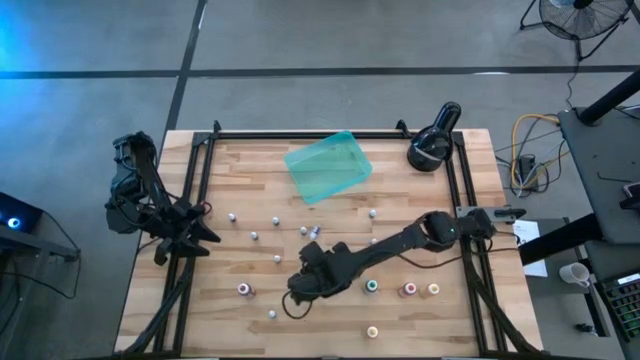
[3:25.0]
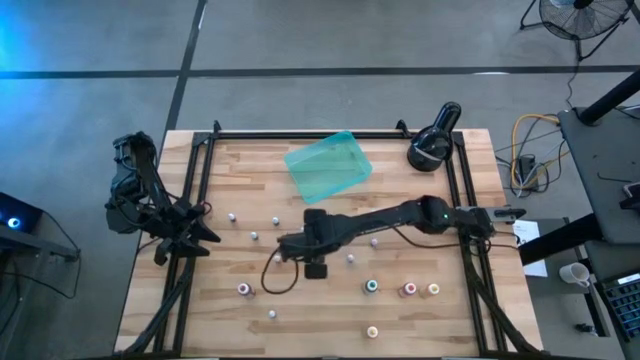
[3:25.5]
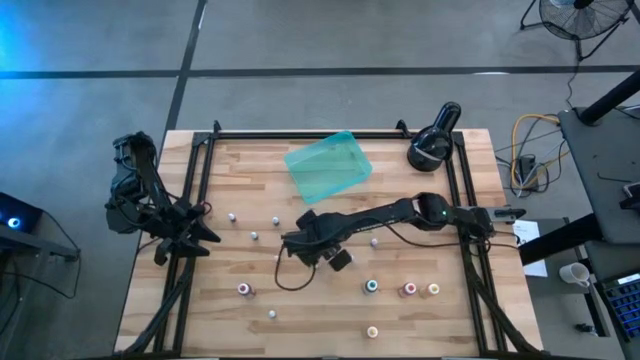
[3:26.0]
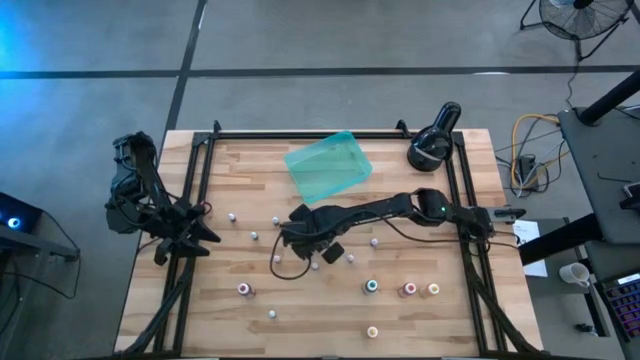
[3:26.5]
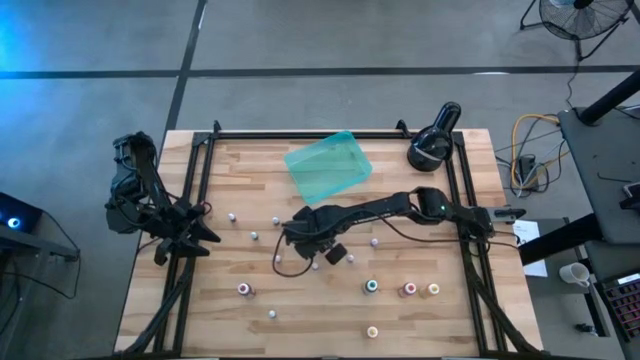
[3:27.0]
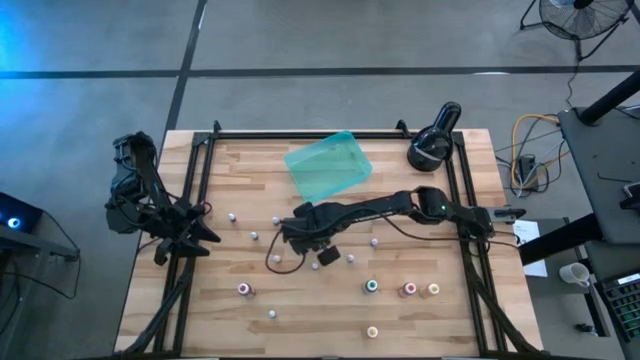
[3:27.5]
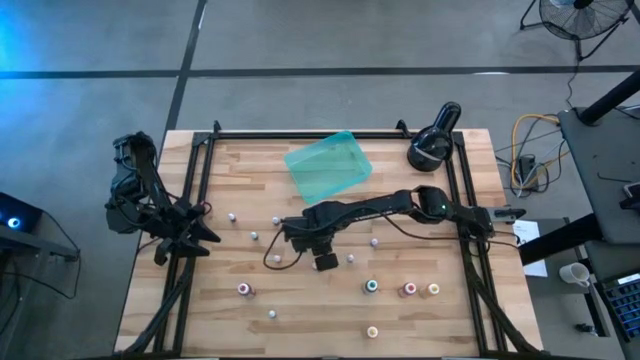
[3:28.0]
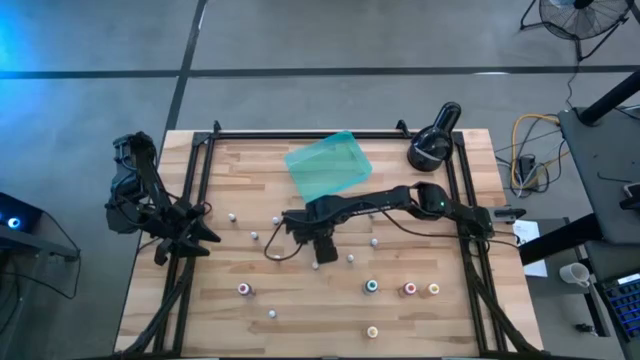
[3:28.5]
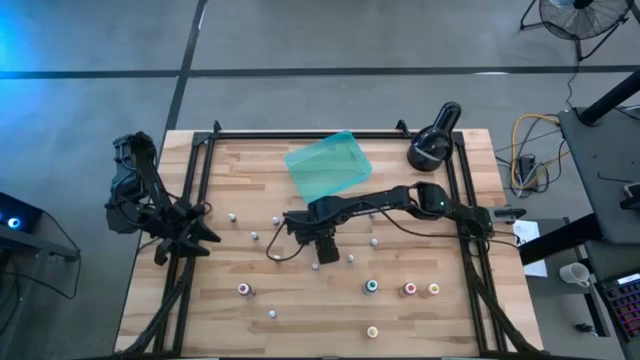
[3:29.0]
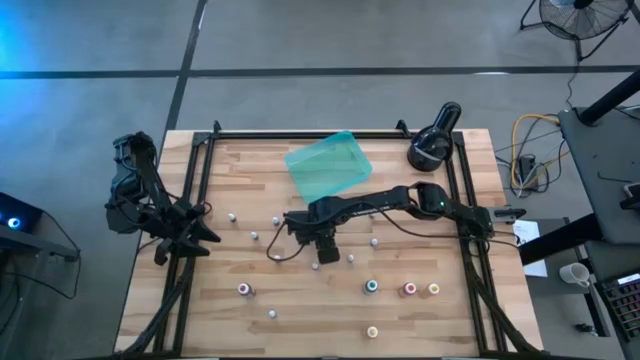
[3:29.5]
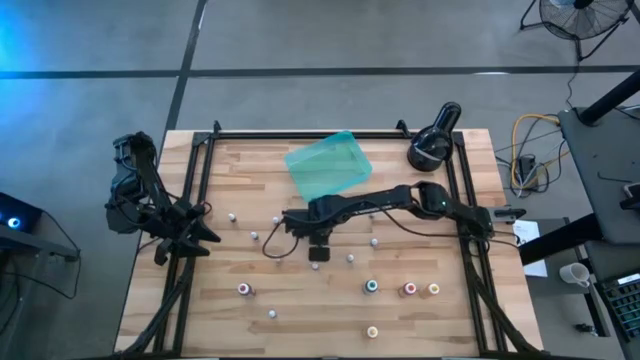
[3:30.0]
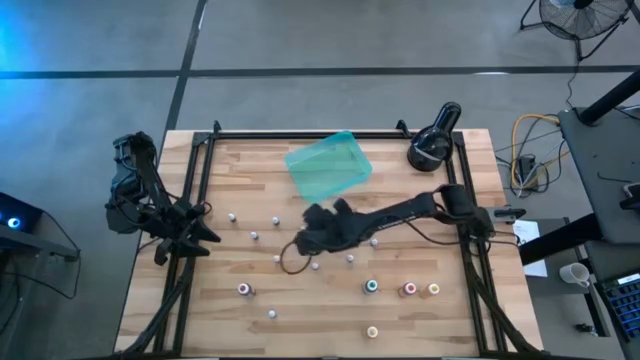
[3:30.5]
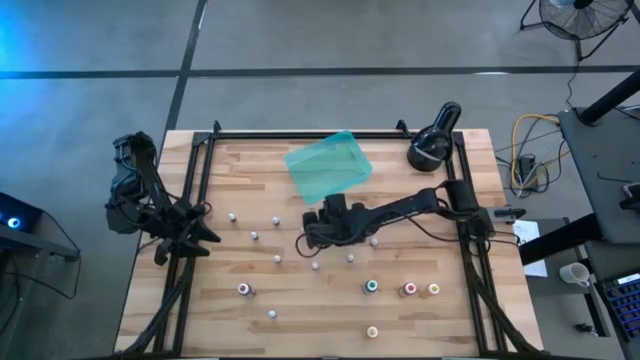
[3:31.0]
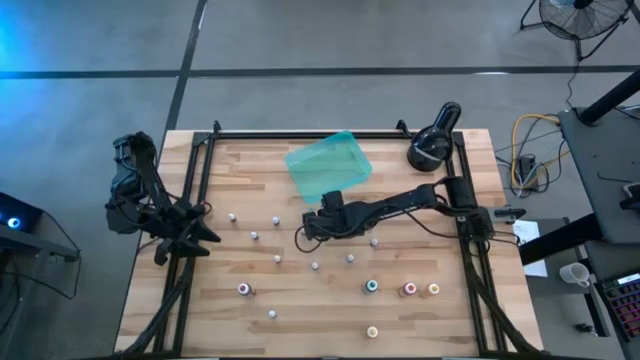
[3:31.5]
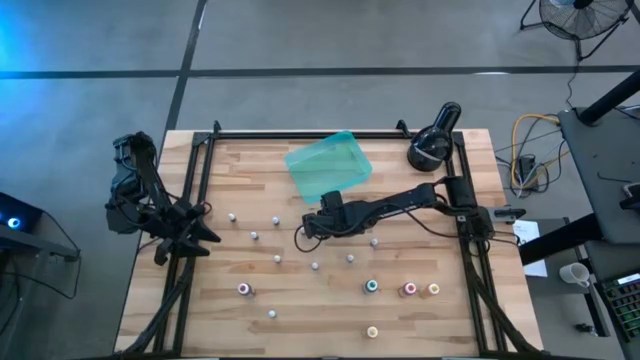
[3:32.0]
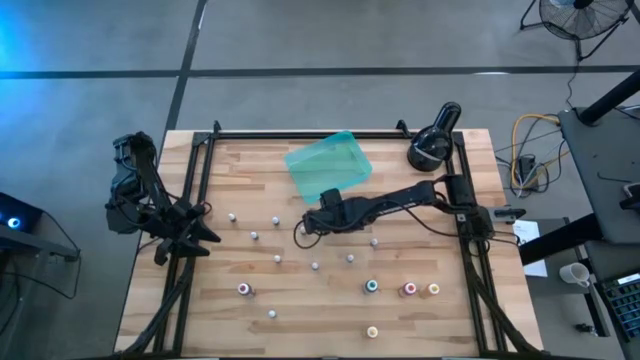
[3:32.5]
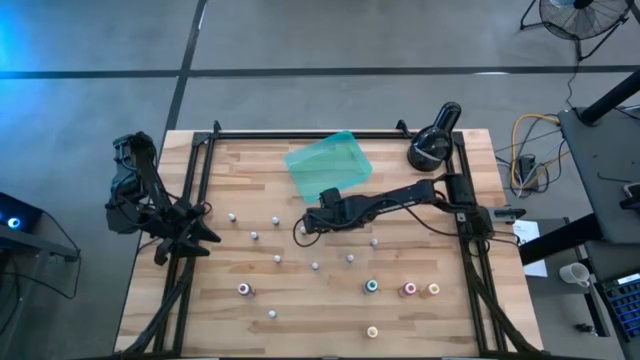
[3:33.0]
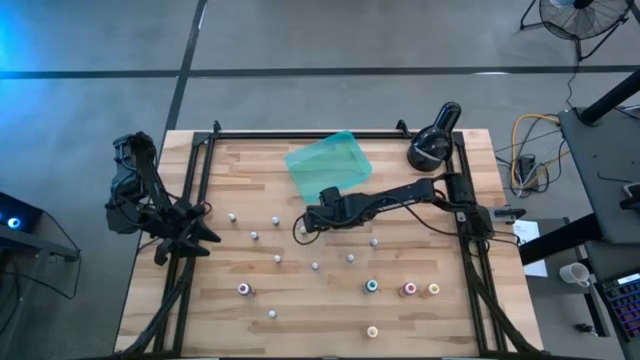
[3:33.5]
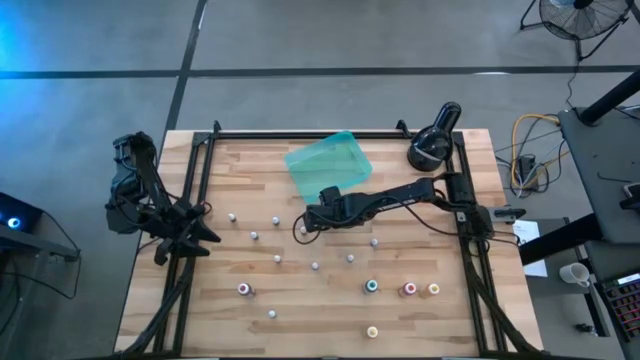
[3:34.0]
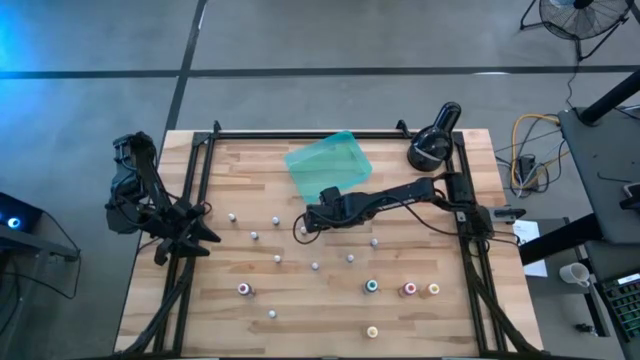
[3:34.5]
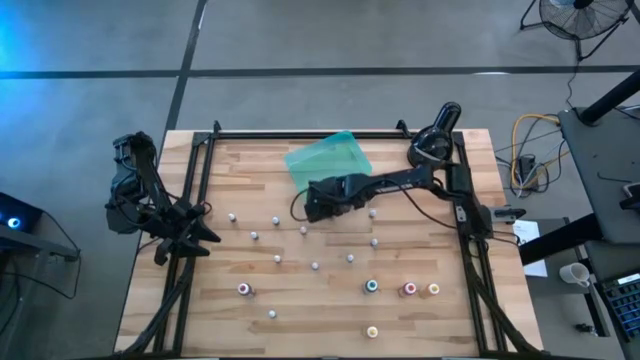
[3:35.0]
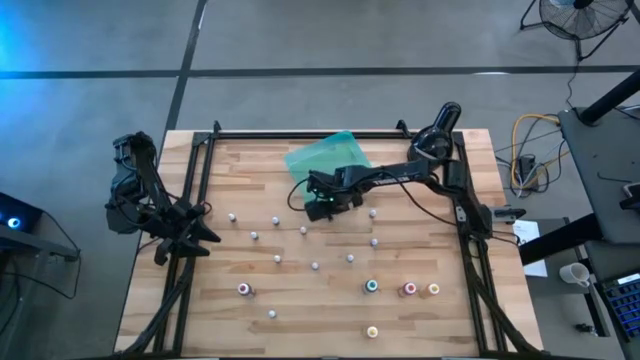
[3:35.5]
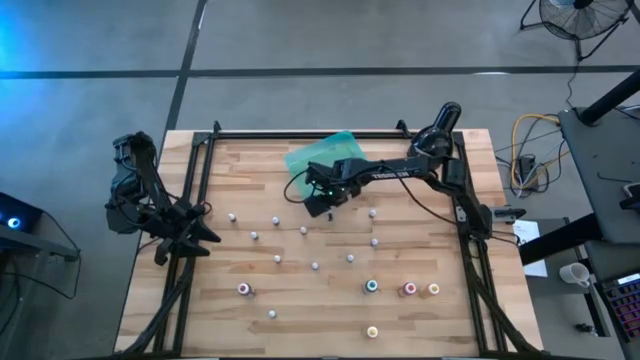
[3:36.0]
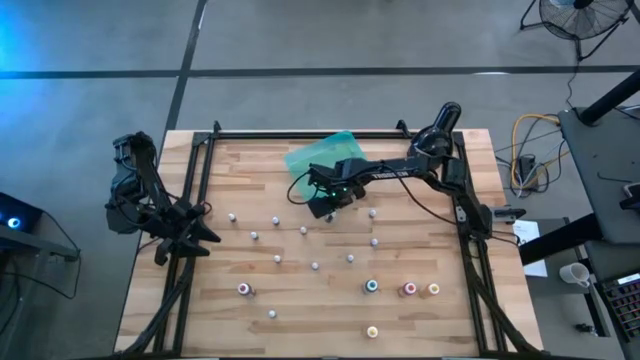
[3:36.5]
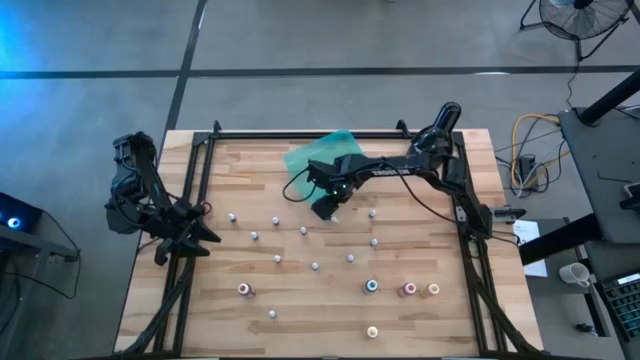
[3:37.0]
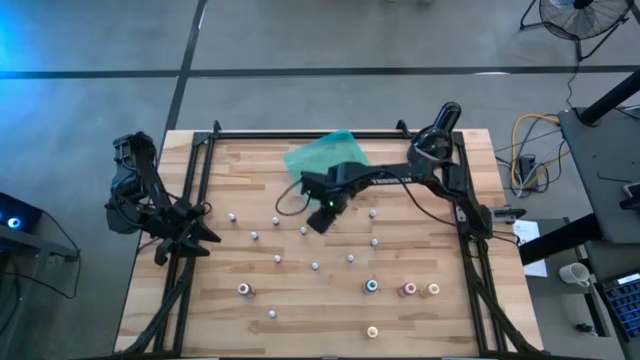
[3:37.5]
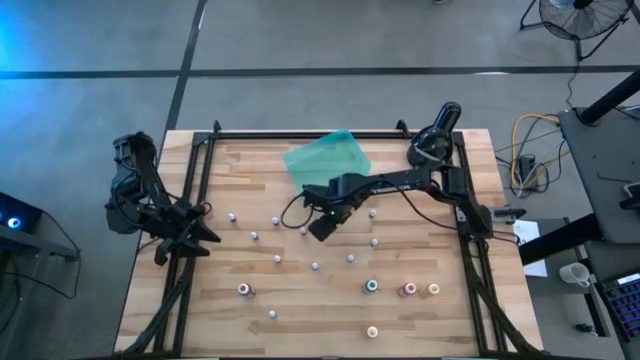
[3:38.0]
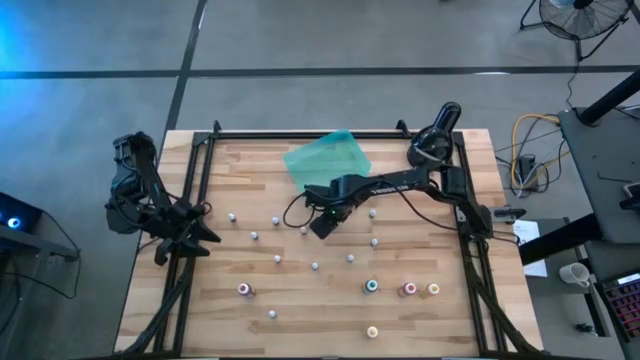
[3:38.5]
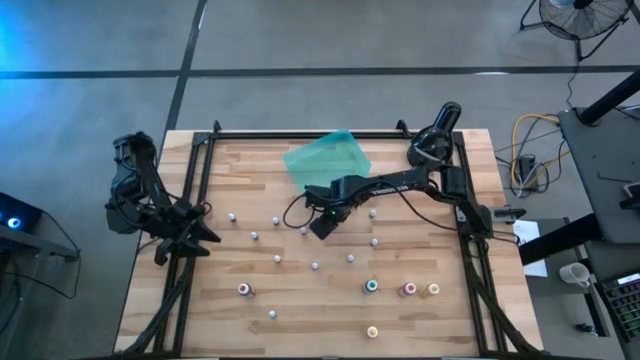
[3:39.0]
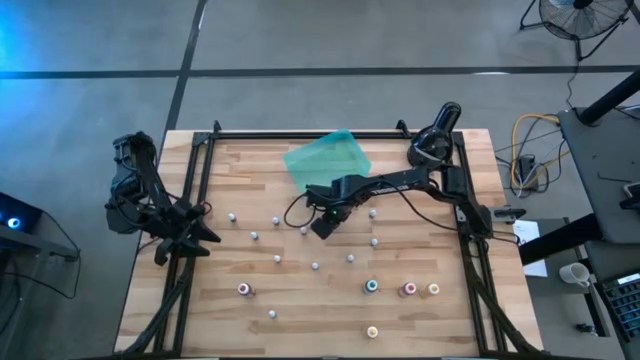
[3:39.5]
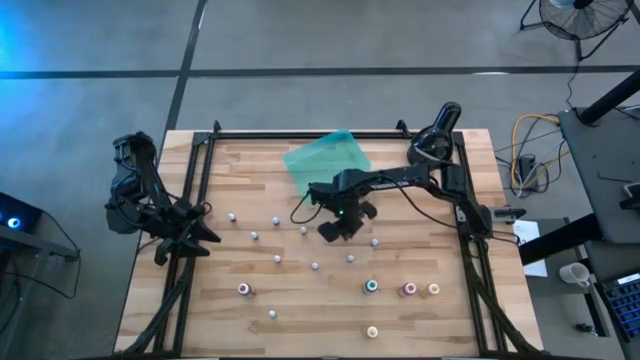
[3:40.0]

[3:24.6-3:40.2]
Task: Pick & Place food coloring
Adjust the red small food coloring bottle

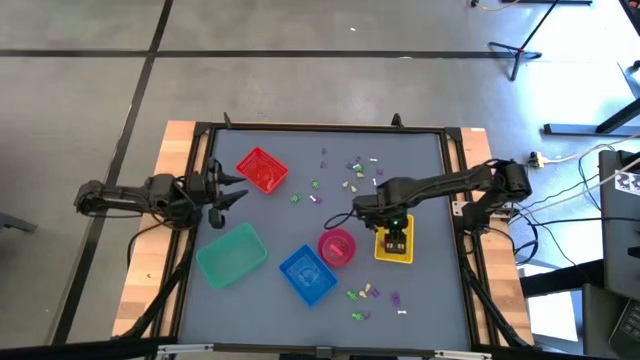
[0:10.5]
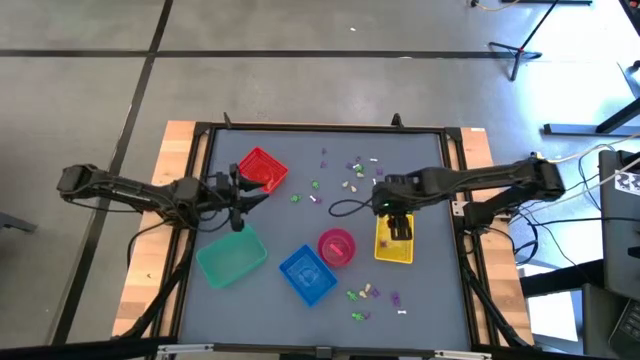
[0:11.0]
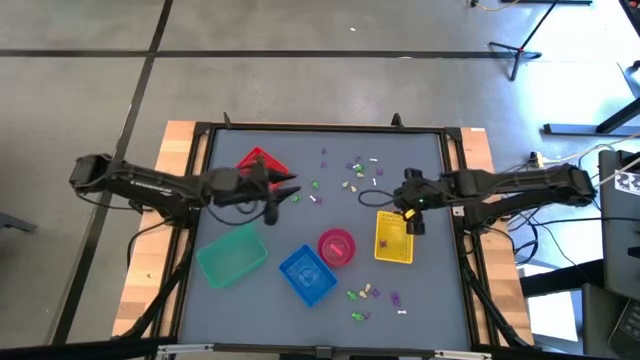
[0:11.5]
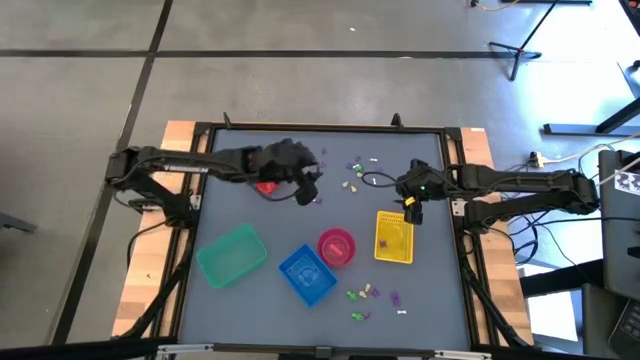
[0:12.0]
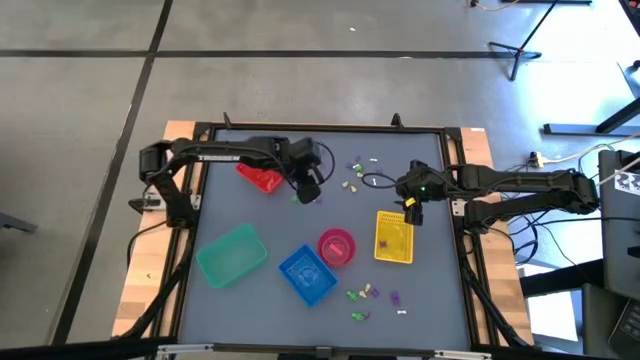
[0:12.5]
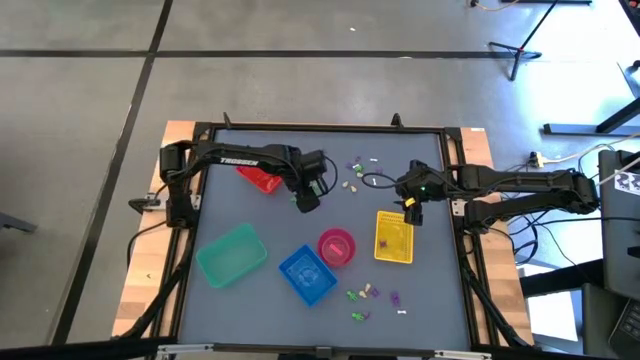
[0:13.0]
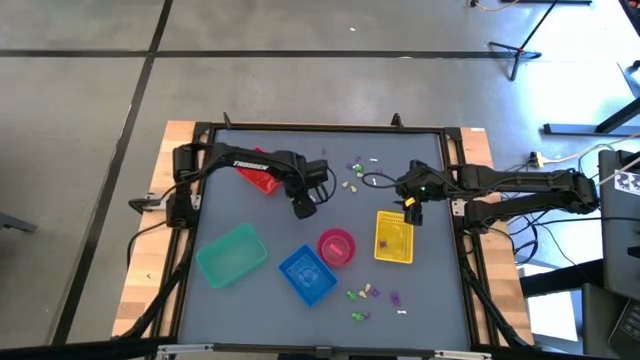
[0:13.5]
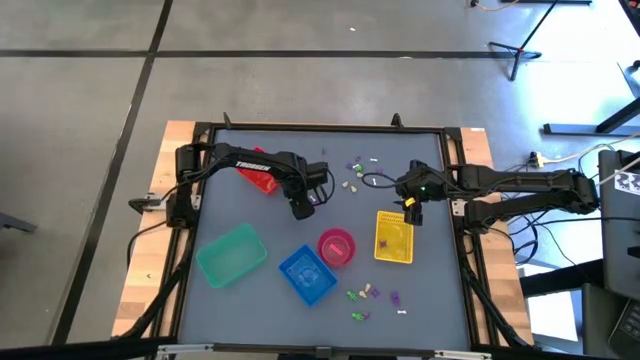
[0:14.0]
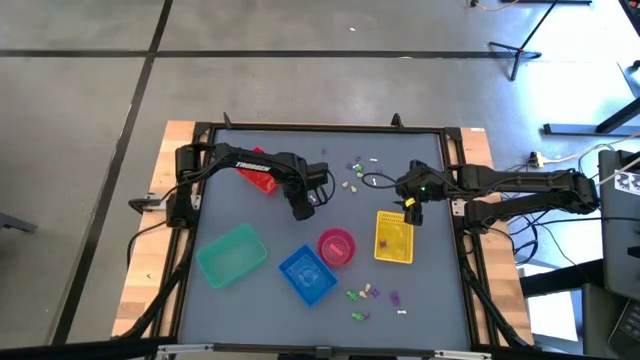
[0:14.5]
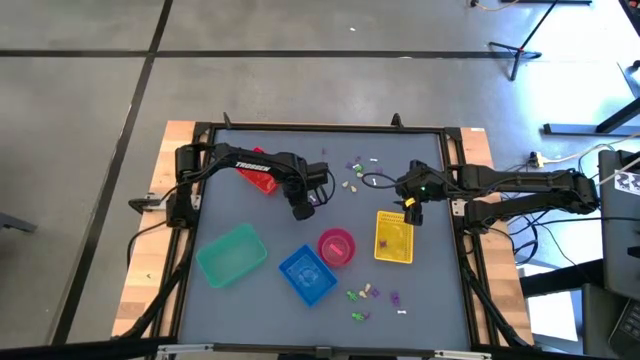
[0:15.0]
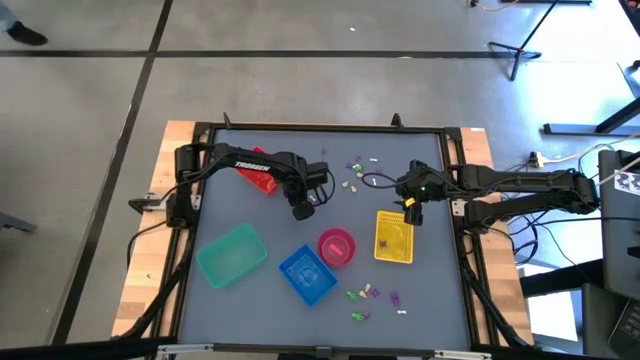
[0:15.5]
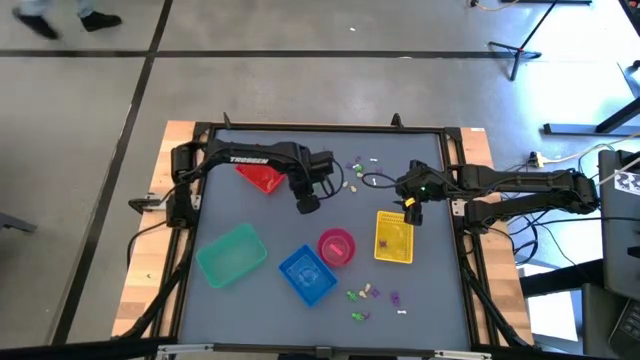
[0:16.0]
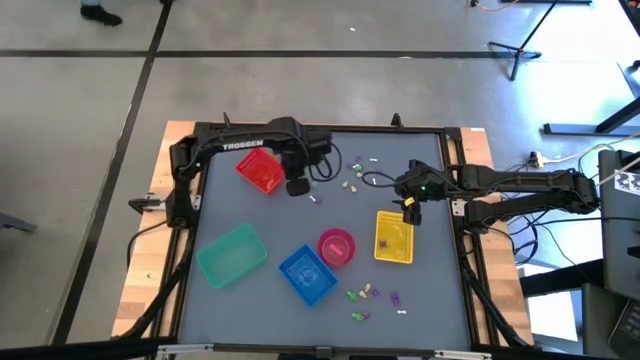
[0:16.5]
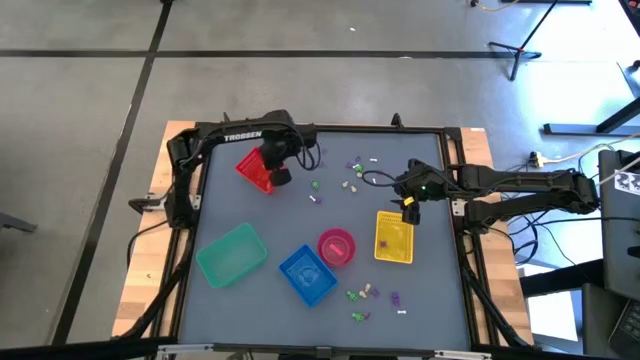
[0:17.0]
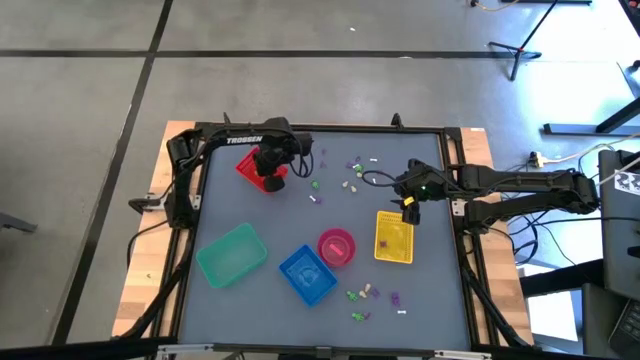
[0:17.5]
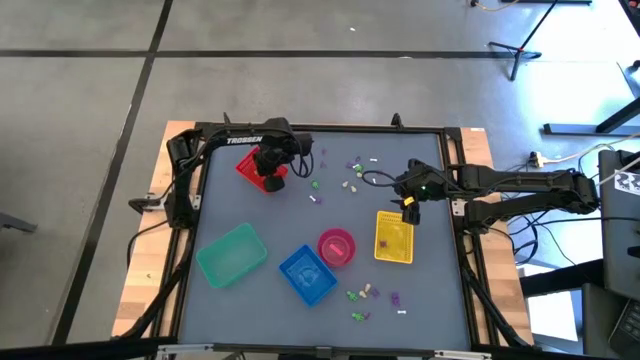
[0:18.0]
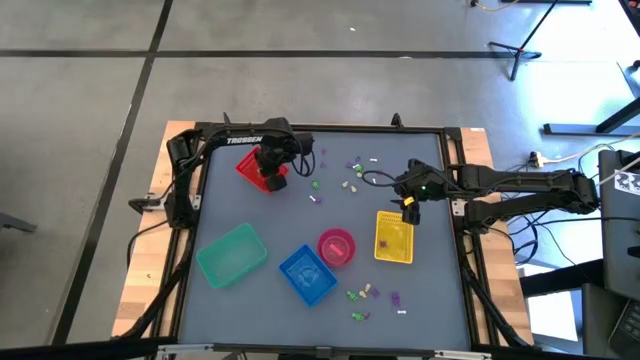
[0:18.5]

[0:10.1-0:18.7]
Task: Sort Halloween decoration
Put the green skeleton toy into the red bin
